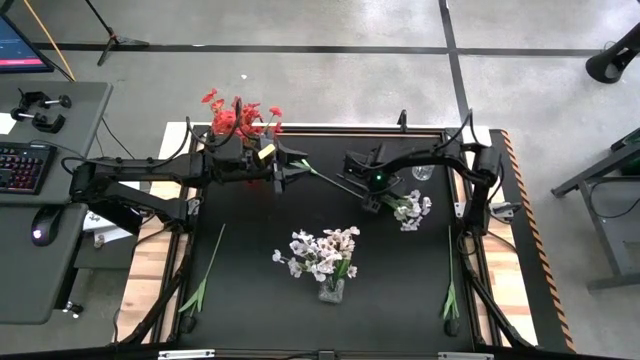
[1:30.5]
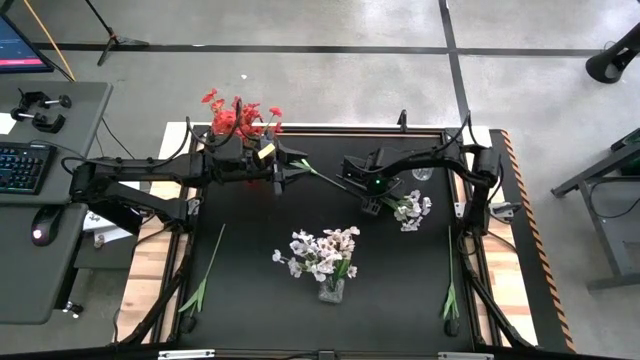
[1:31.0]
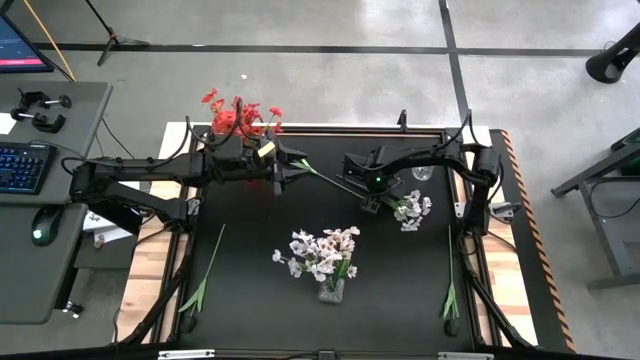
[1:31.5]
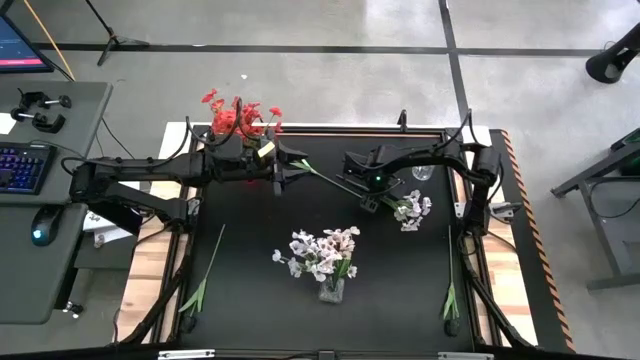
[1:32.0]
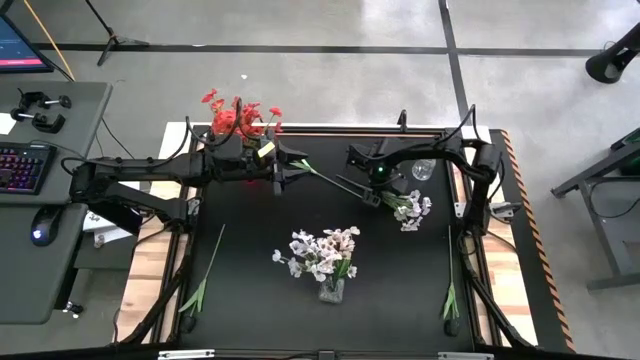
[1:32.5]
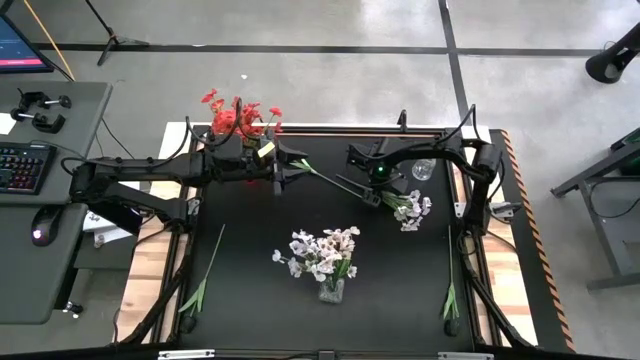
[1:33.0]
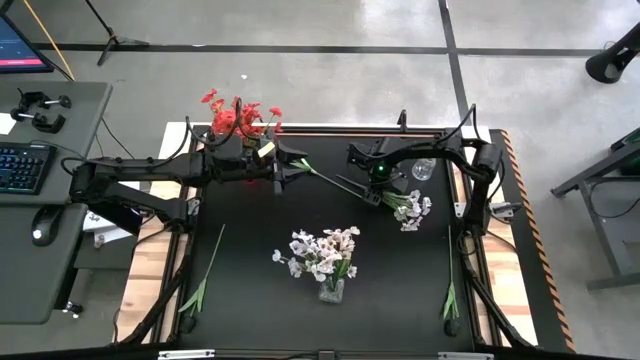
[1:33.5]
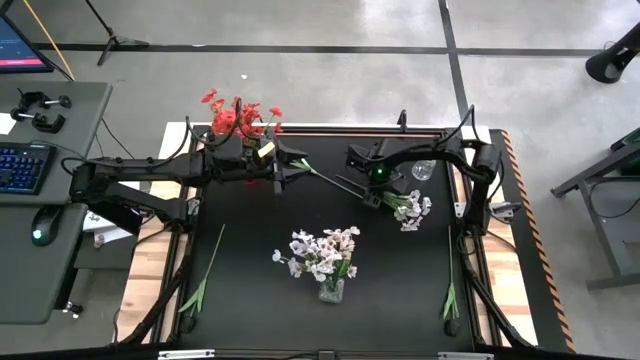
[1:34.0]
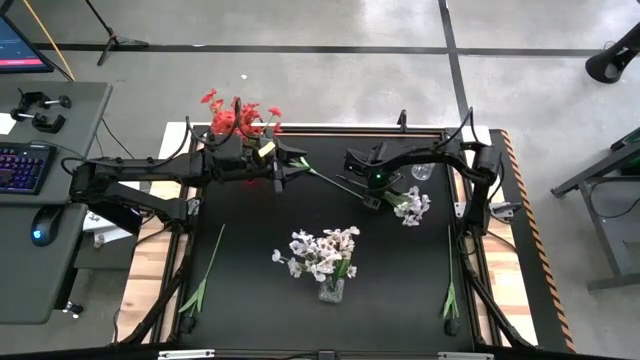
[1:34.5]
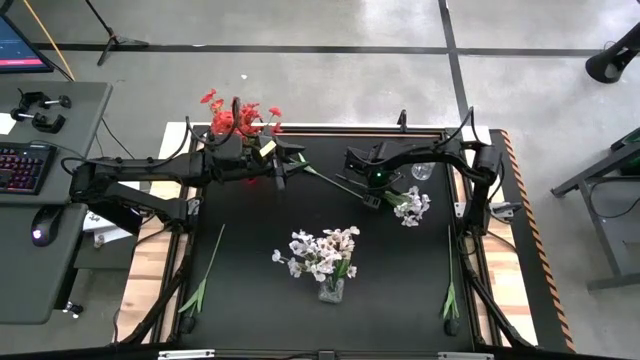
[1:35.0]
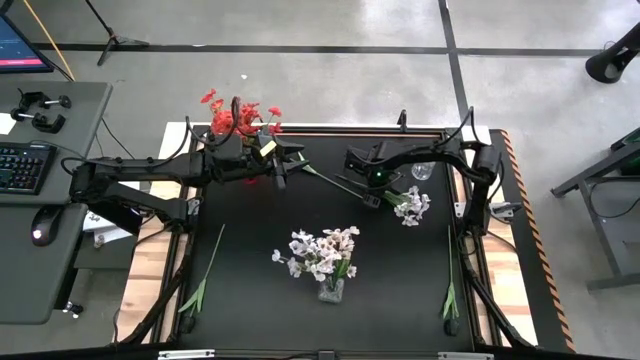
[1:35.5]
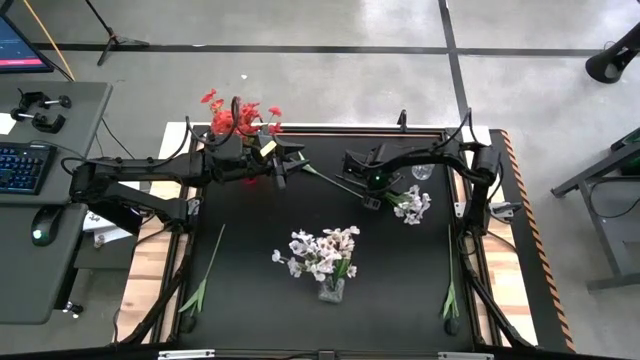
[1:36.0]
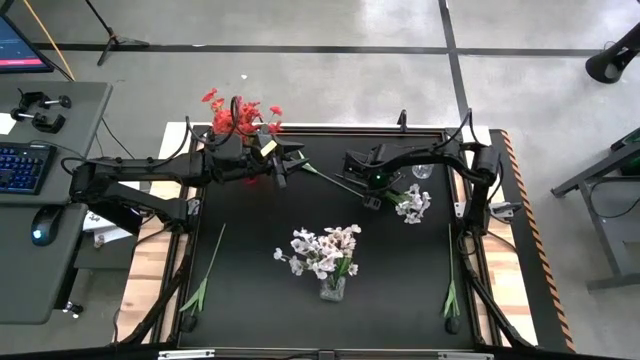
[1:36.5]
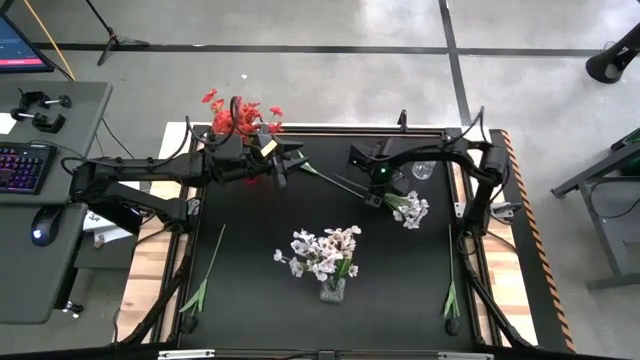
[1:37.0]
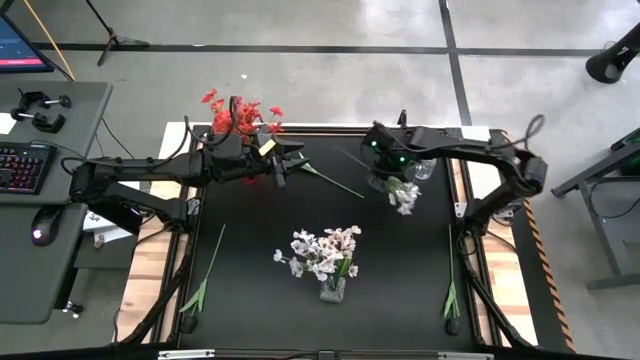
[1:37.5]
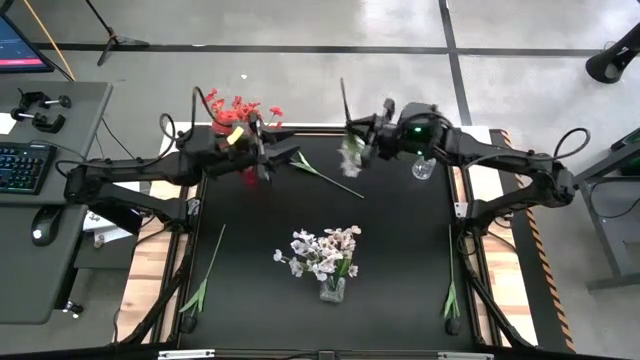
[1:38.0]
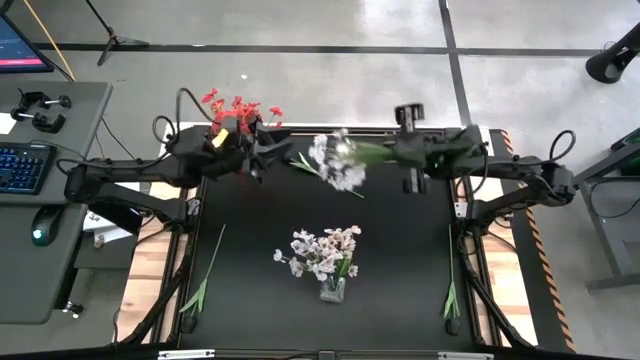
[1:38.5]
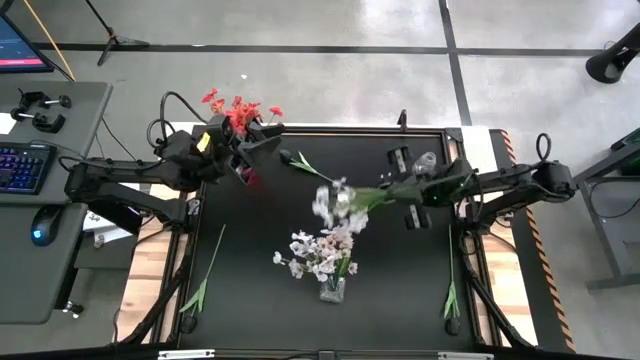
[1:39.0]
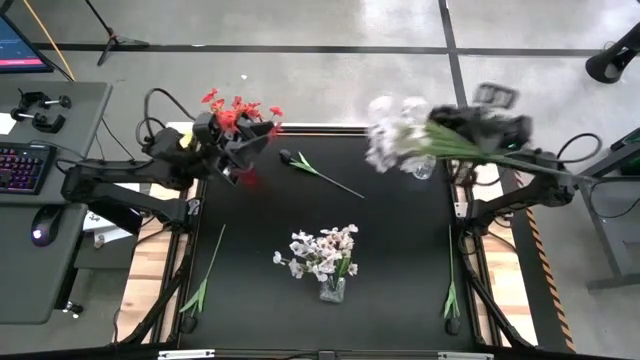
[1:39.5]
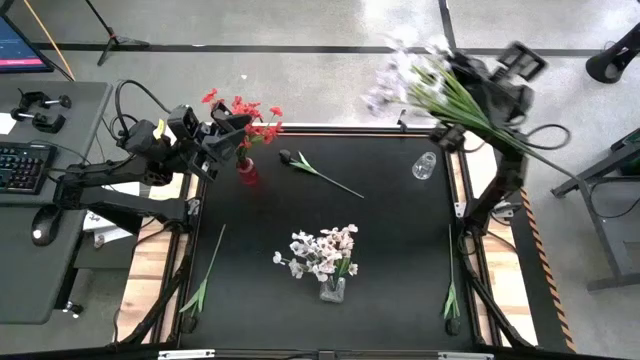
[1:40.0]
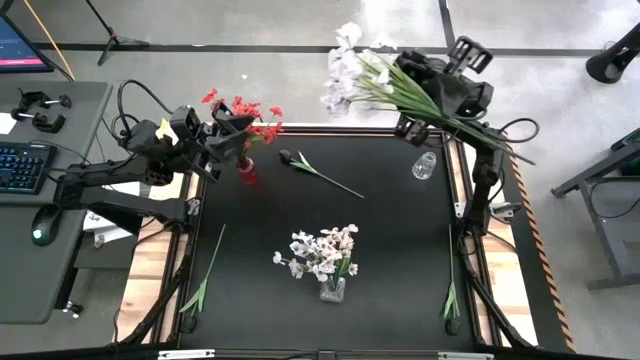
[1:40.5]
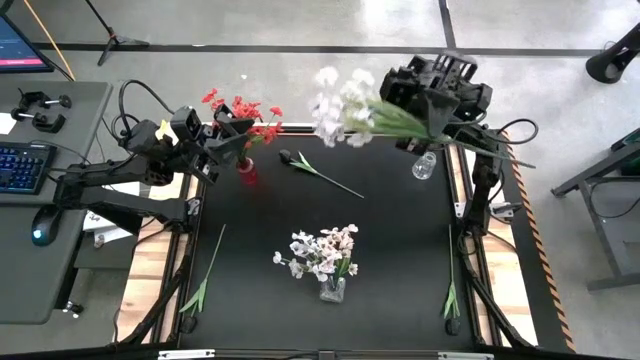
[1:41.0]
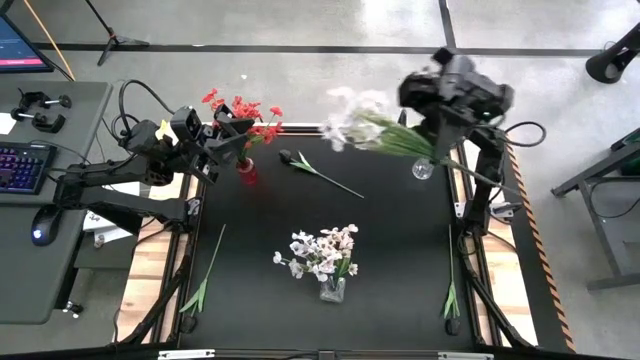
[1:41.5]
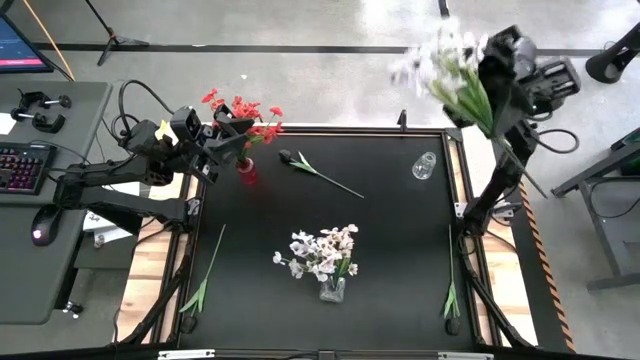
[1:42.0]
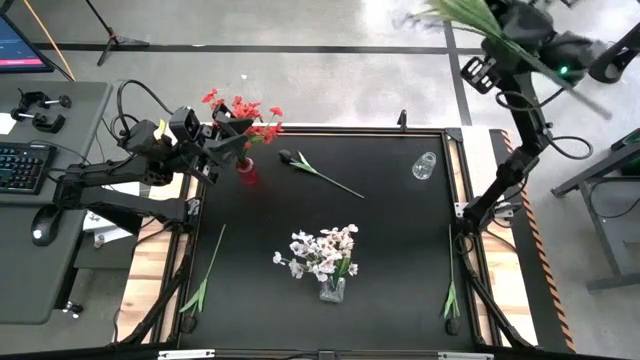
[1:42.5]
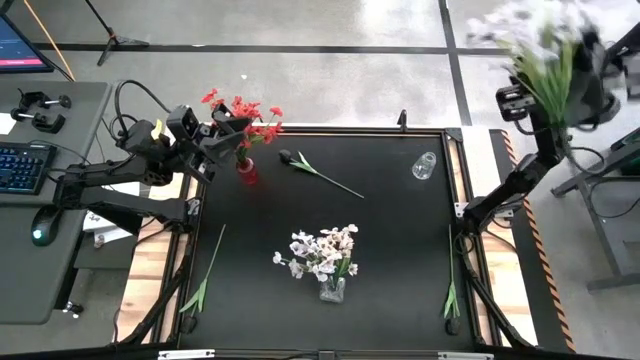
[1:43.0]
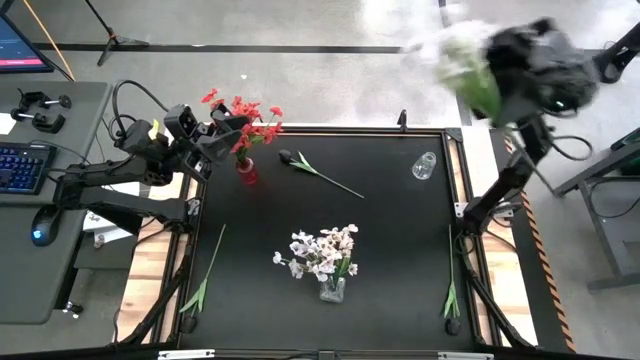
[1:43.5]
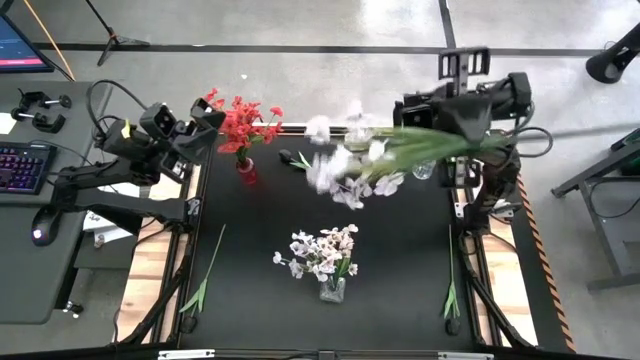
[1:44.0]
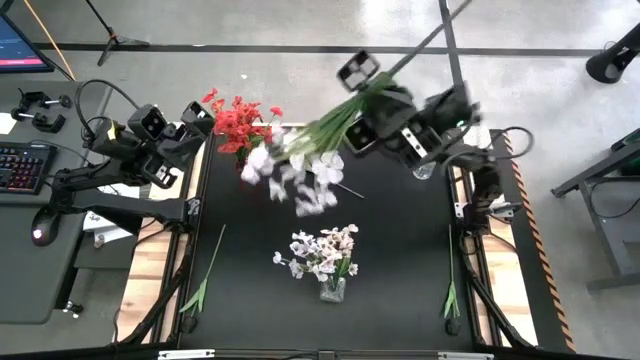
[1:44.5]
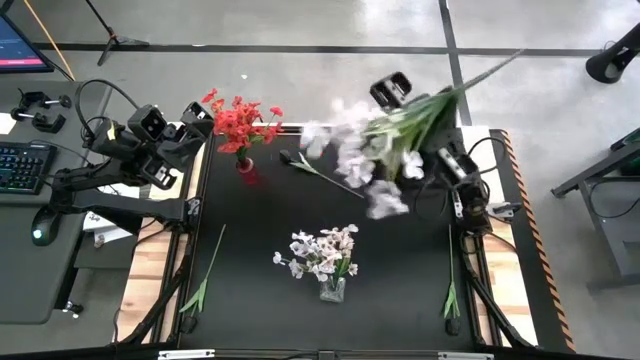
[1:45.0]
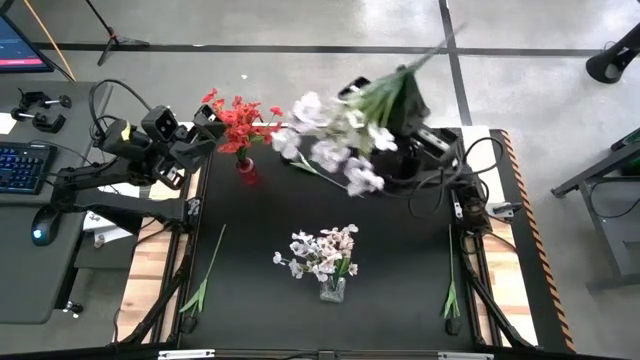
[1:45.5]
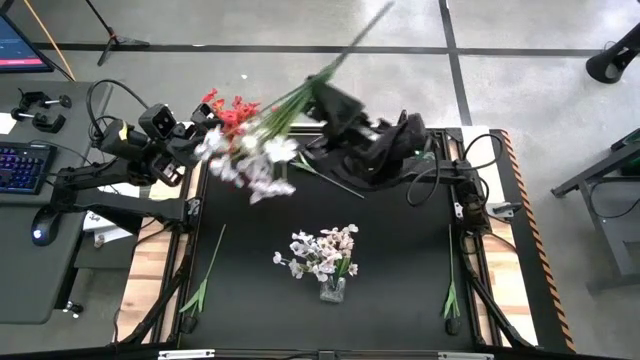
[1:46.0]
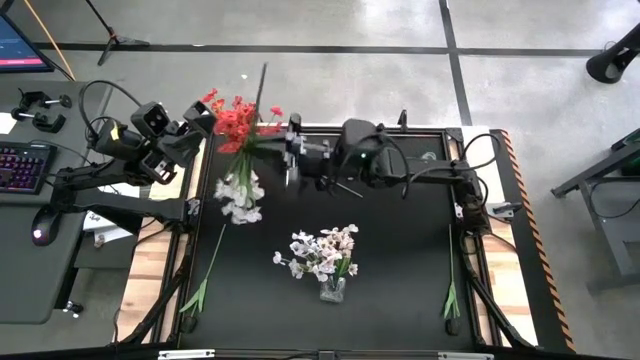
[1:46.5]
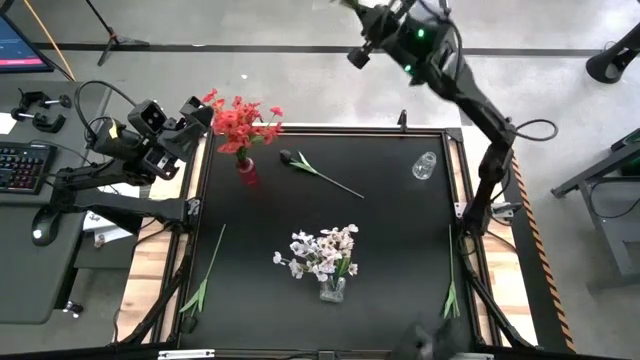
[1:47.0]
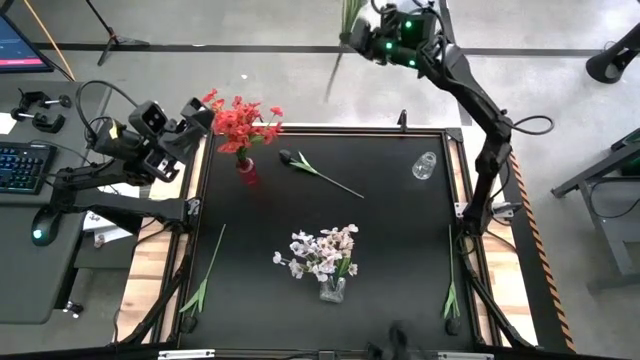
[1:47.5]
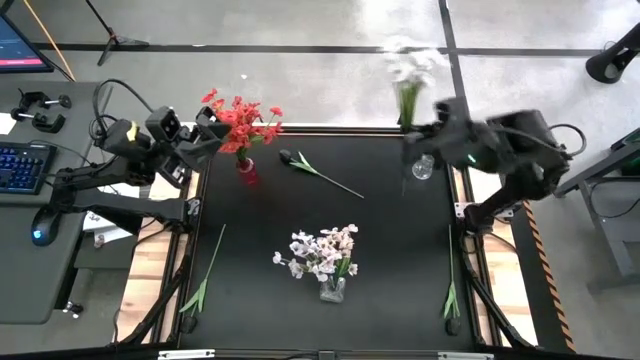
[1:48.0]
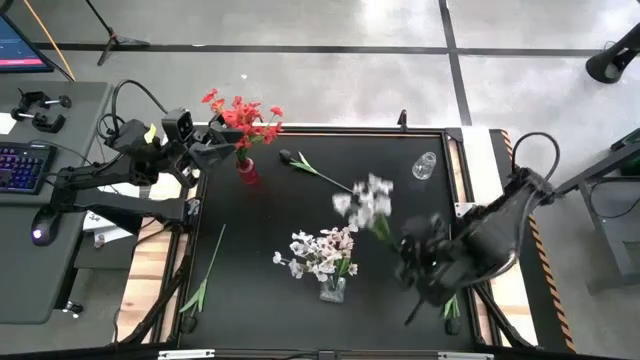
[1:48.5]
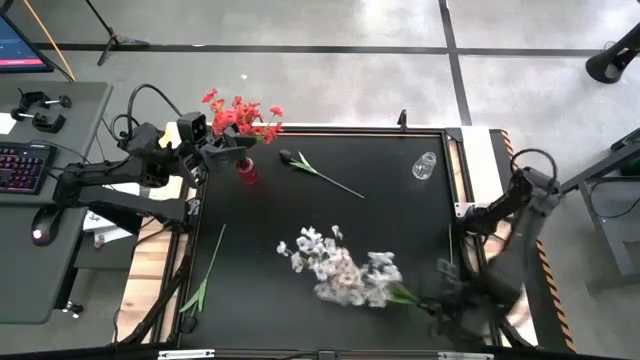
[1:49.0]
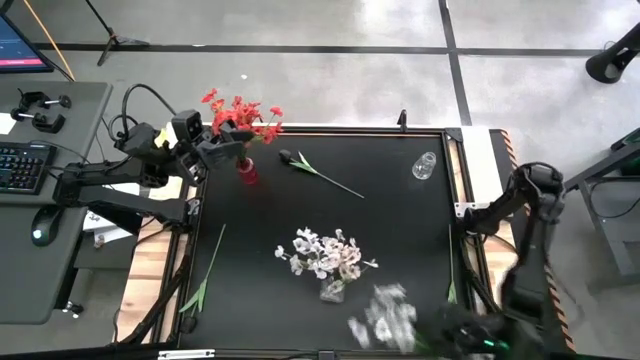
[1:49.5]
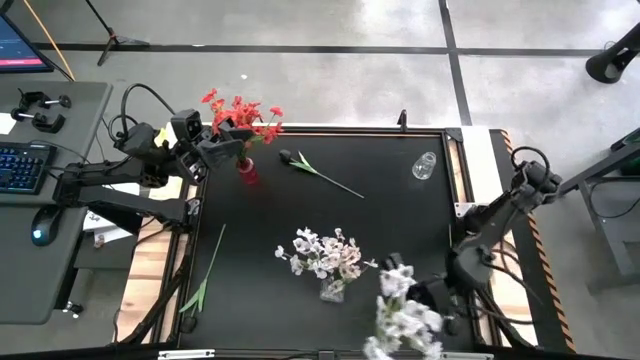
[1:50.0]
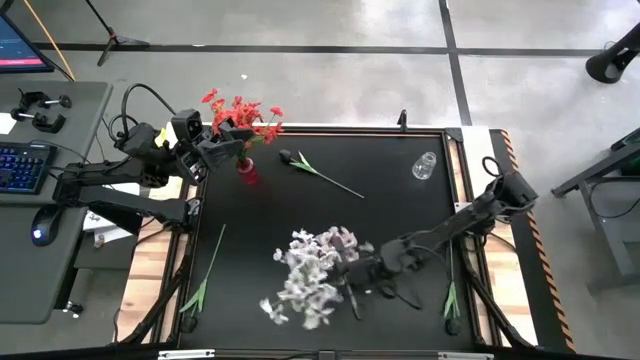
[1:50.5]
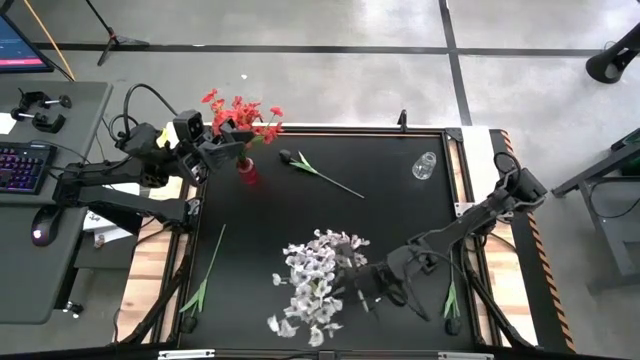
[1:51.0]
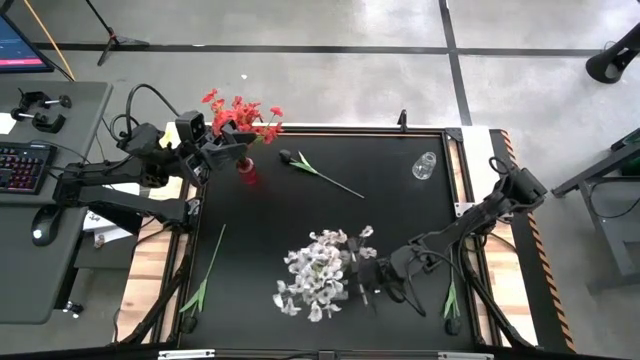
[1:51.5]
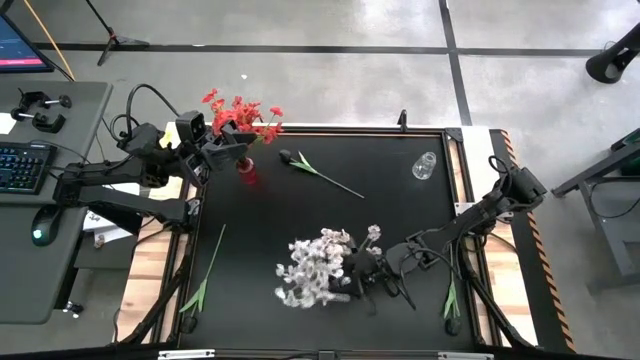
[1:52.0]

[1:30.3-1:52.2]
Task: Sort flowers into vase by color
Put the white flowers into the bottom transparent vase
